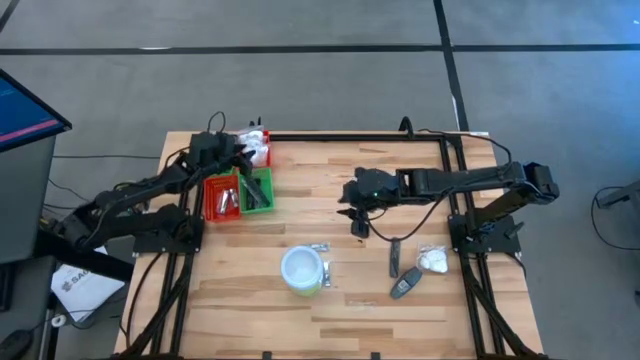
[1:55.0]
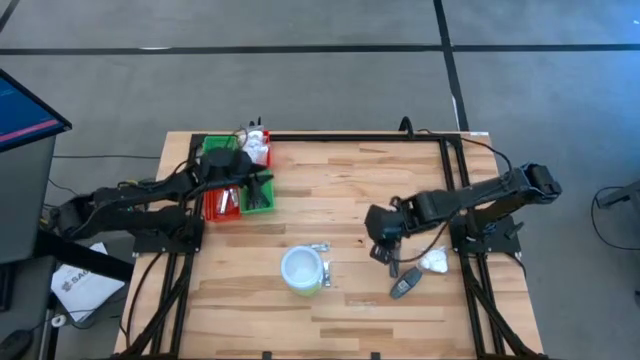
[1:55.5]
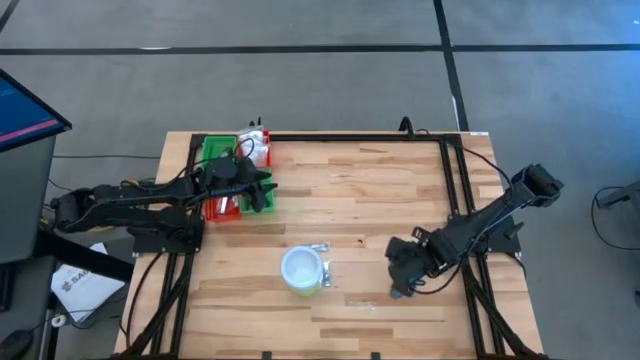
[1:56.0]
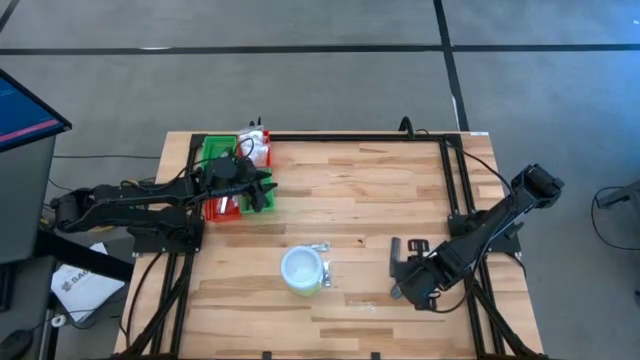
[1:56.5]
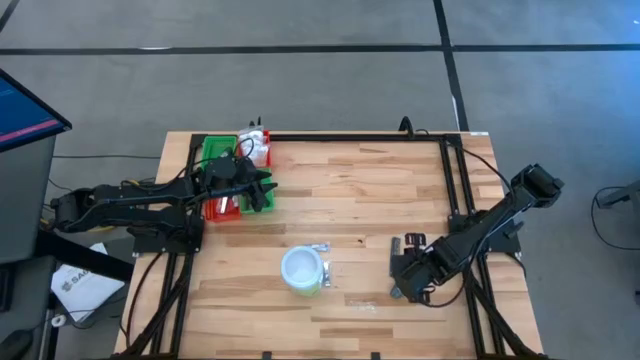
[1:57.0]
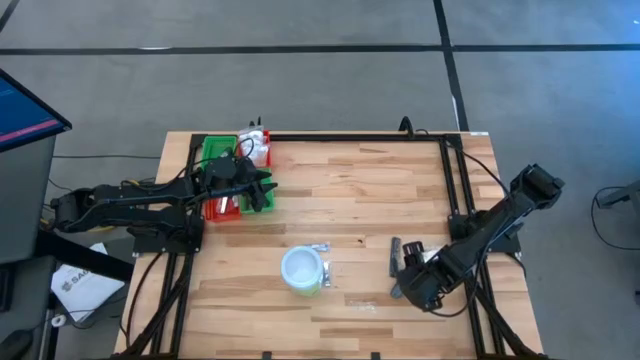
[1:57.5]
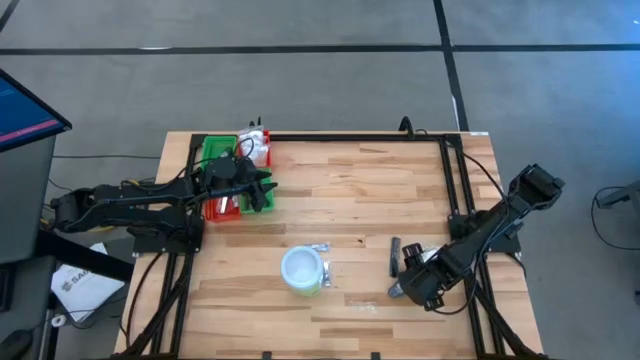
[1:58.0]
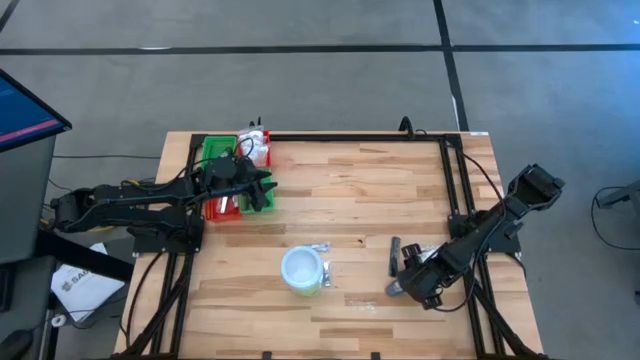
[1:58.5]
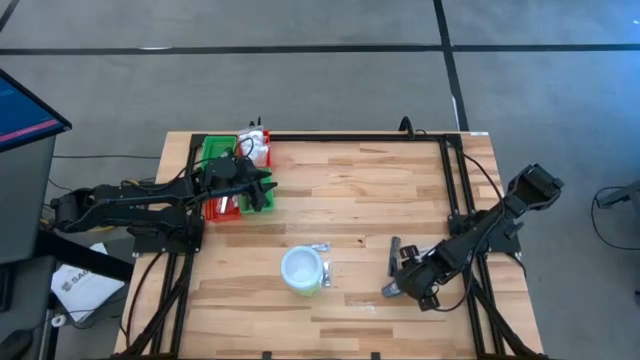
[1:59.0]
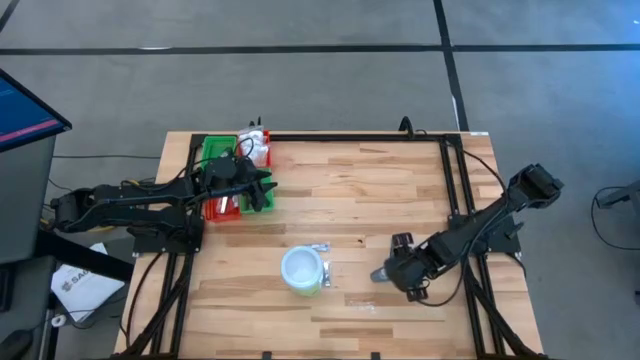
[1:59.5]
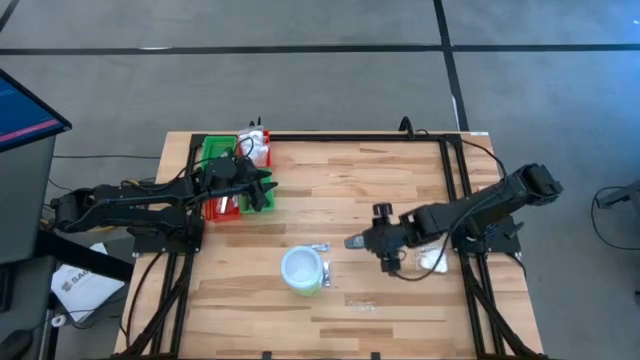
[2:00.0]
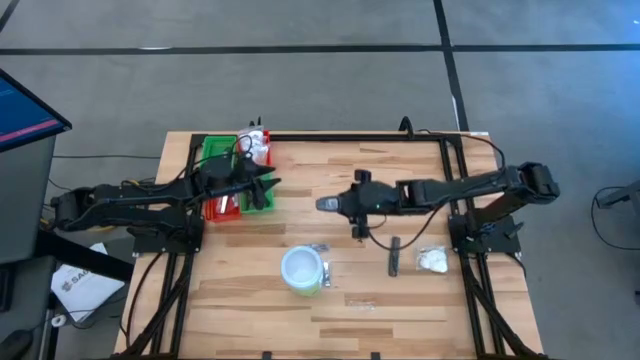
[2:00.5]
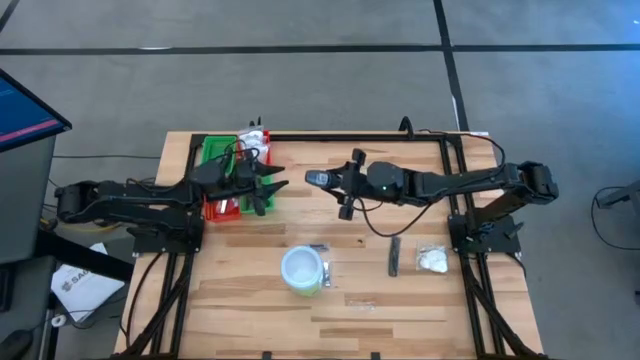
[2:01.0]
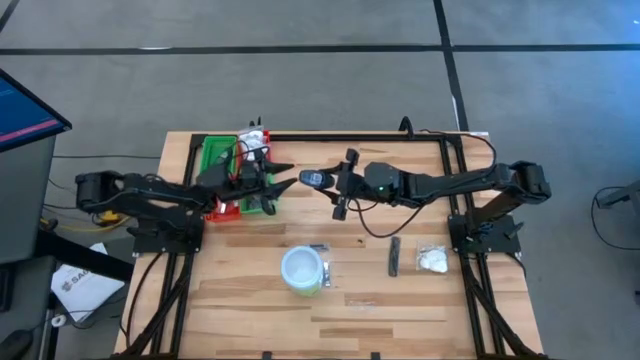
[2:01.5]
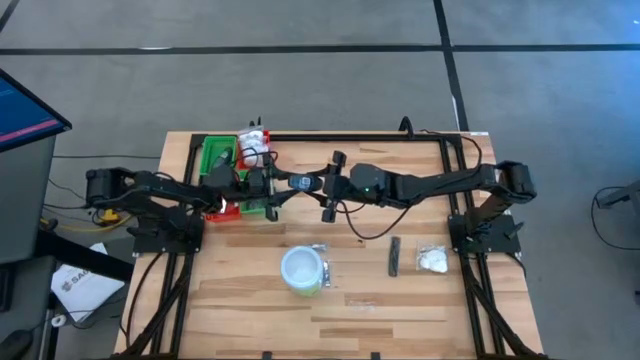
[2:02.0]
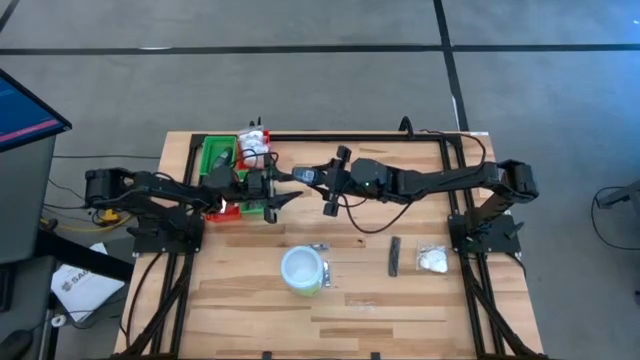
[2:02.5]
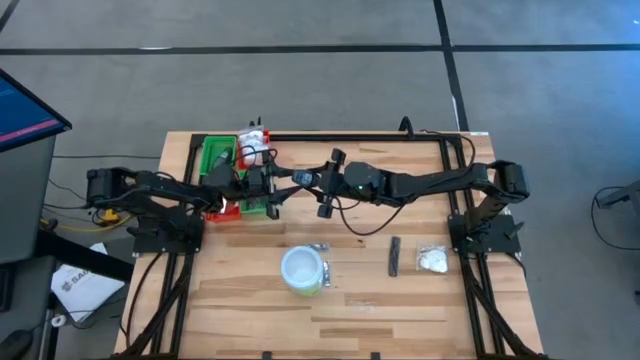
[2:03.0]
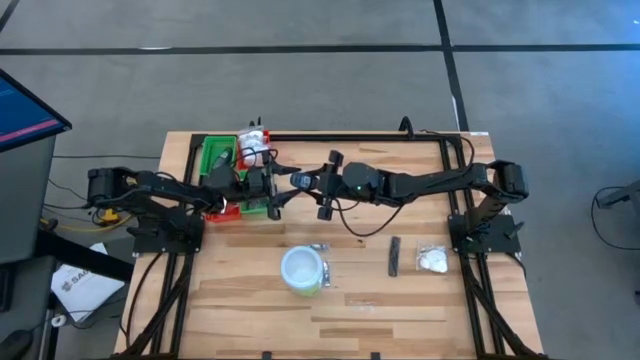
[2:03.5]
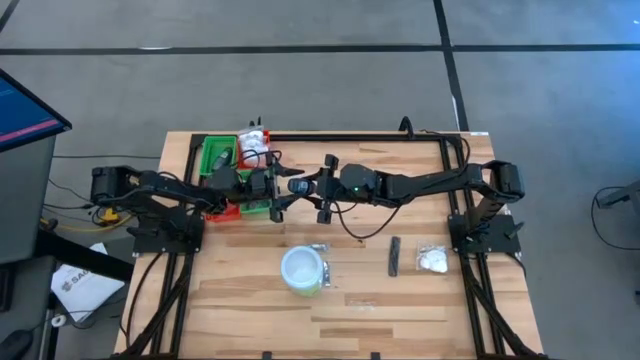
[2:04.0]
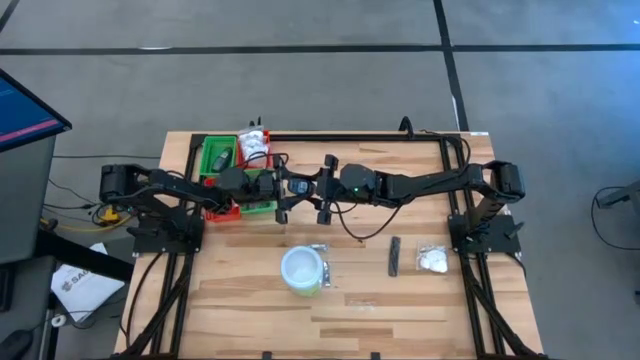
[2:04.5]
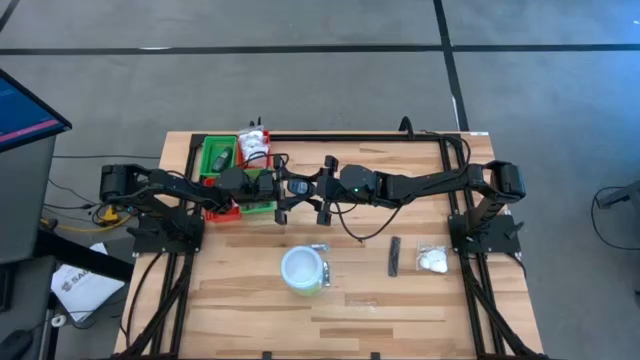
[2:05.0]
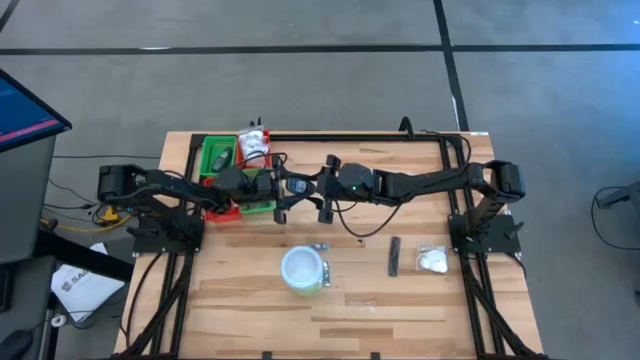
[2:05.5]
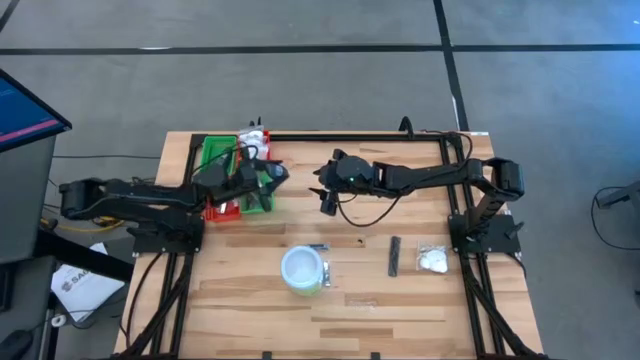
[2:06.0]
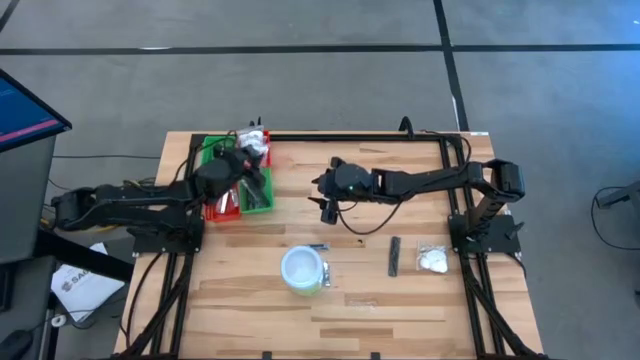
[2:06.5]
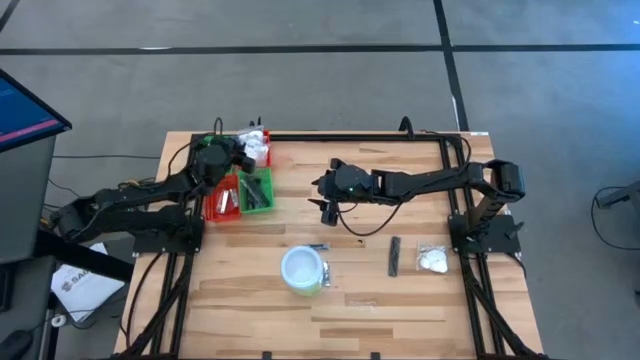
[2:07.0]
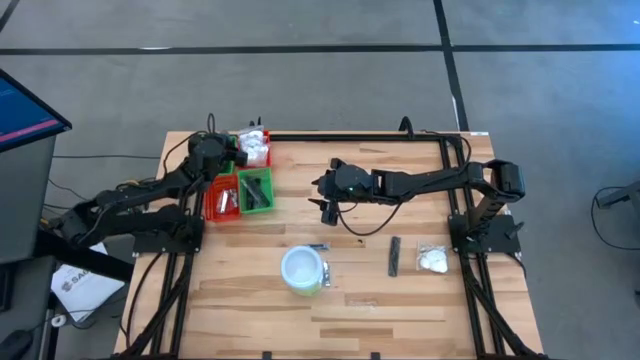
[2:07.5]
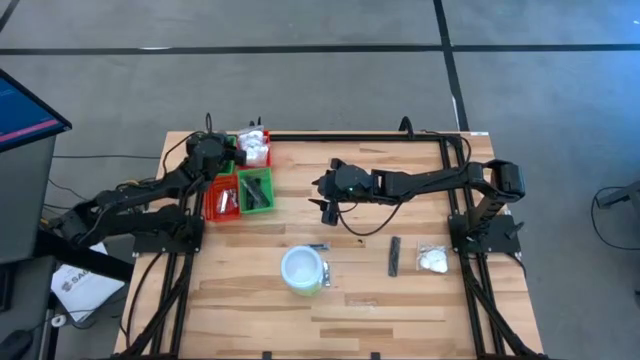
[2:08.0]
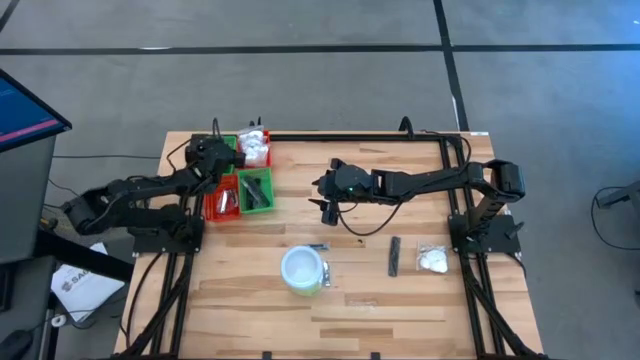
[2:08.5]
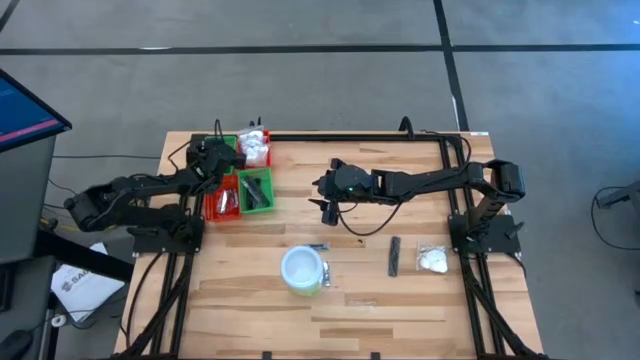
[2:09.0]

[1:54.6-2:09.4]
Task: Pick & Place Travel size toiletries
Put the gray deodorant into the top green bin

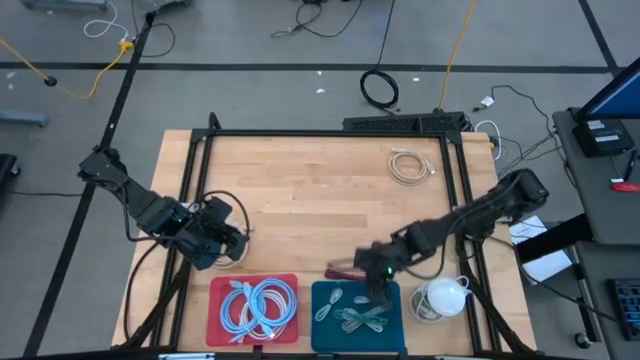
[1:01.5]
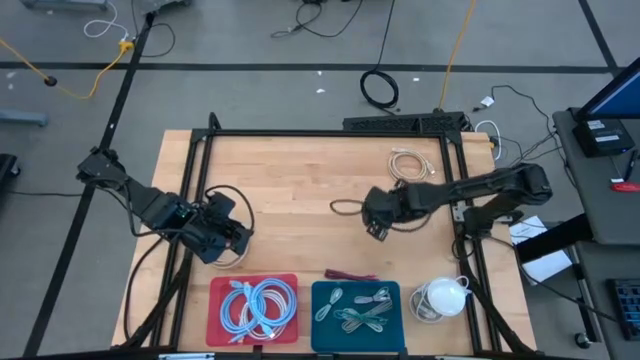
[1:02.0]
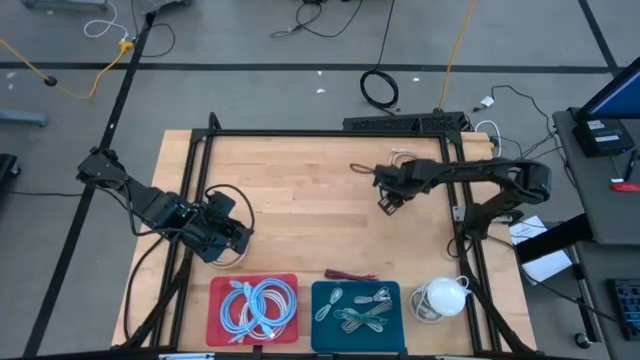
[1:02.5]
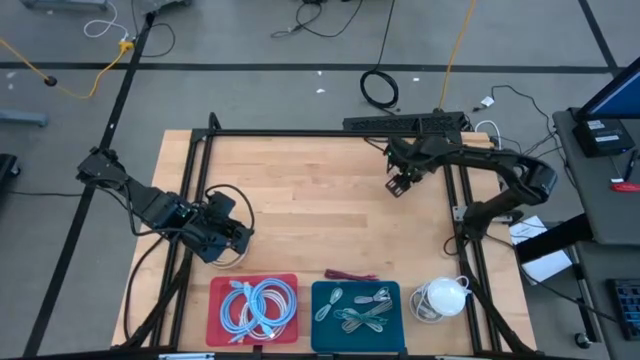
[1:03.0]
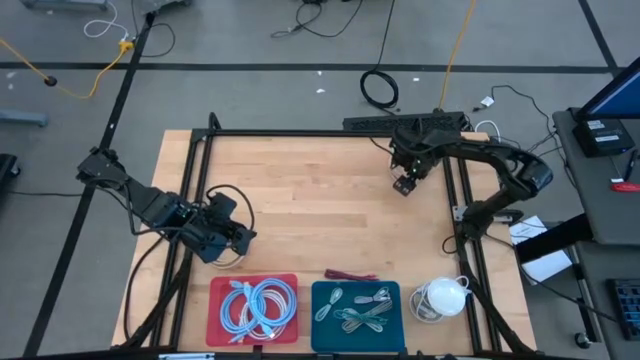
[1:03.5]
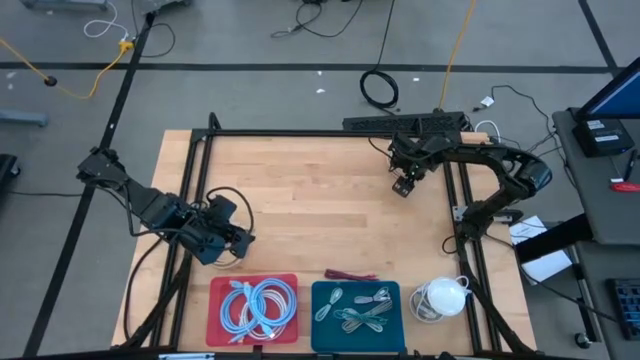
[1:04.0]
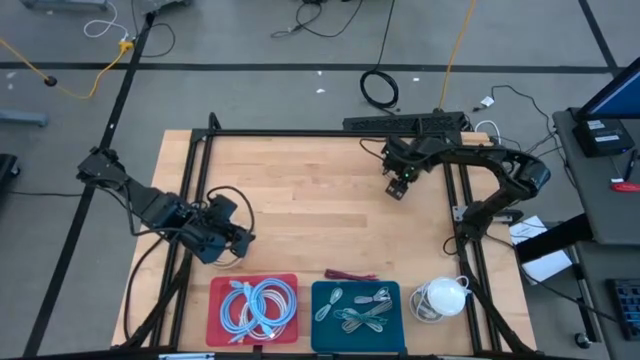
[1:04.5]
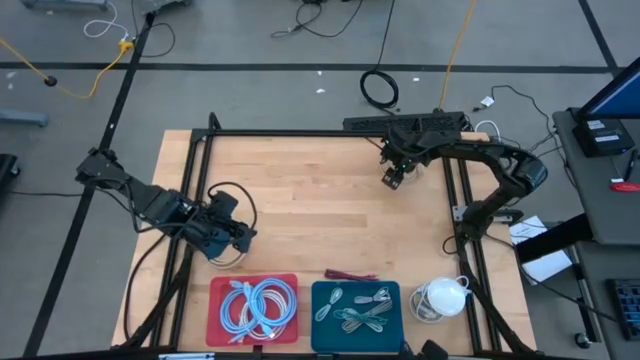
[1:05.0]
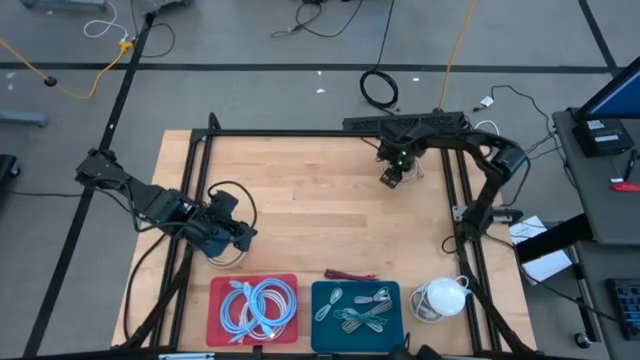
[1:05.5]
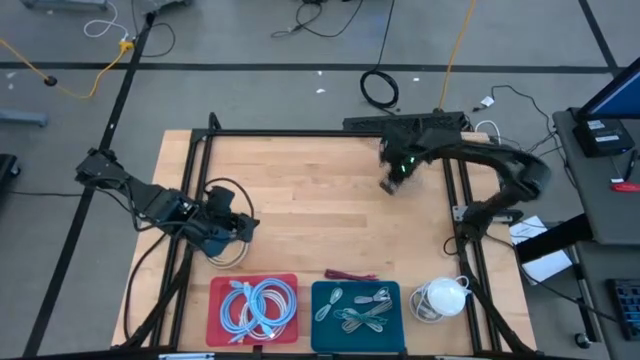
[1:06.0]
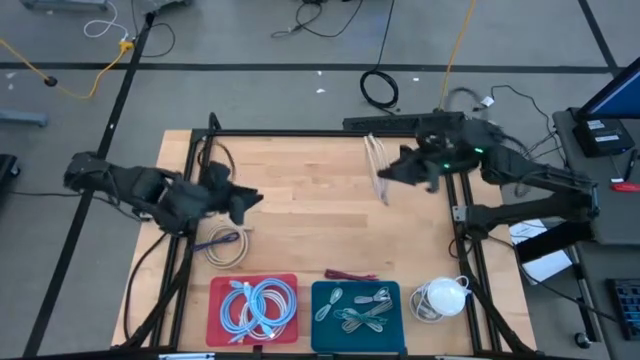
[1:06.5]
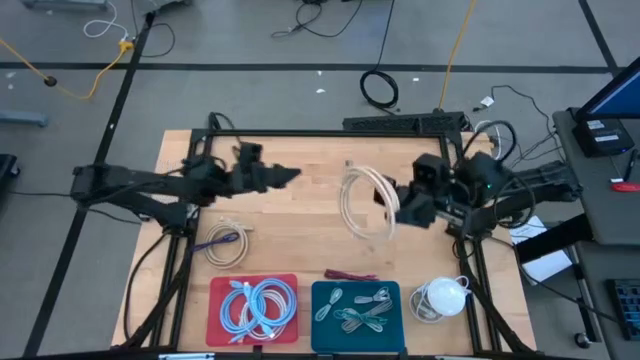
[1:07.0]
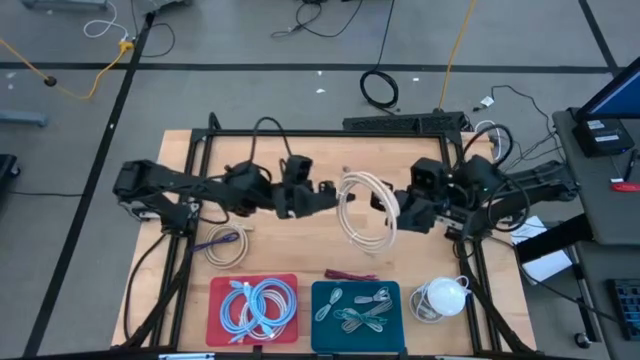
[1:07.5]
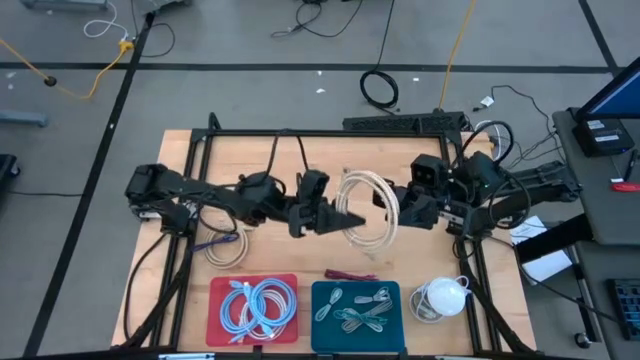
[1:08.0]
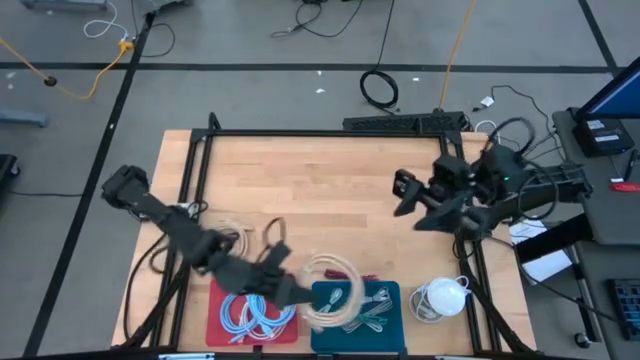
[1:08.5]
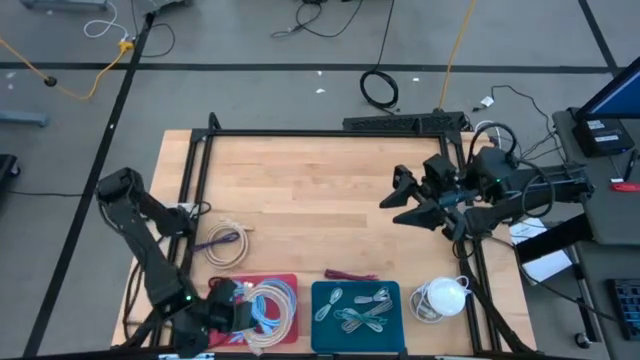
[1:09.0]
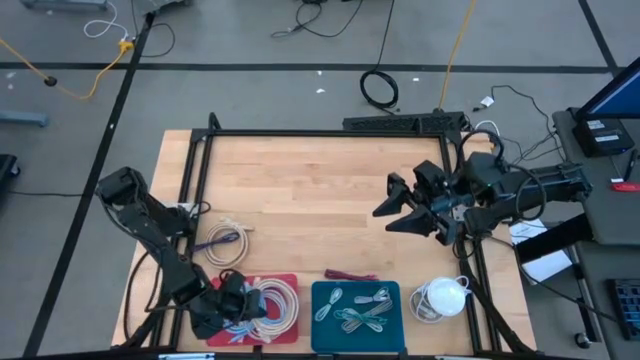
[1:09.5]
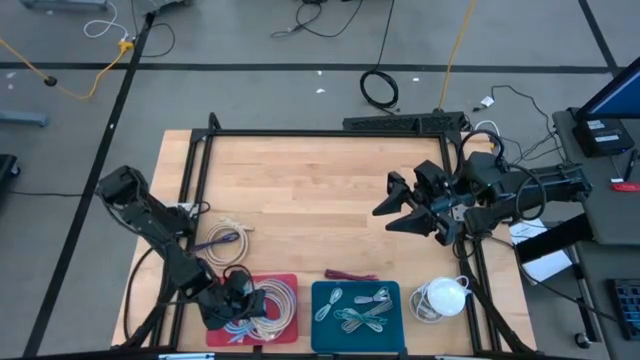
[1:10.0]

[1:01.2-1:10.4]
Task: Pick & Place USB Port
Put the top right brown HDMI cable into the red bin
